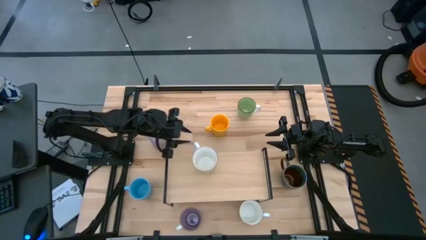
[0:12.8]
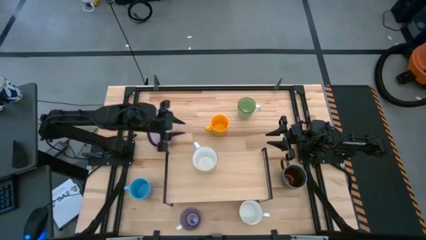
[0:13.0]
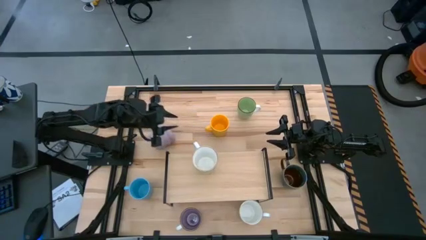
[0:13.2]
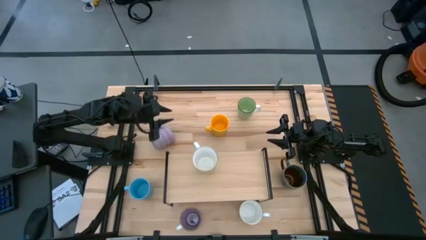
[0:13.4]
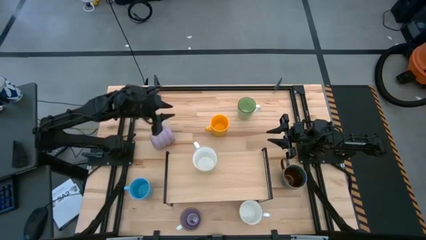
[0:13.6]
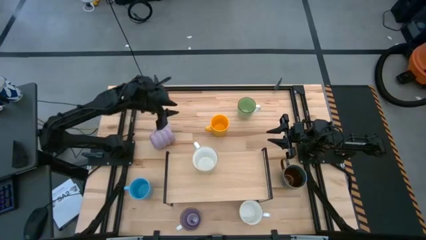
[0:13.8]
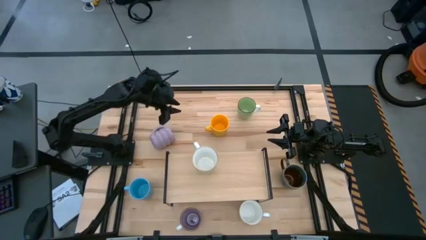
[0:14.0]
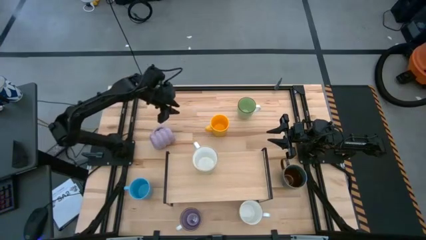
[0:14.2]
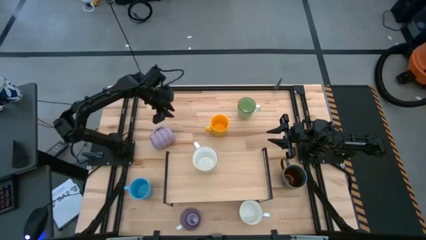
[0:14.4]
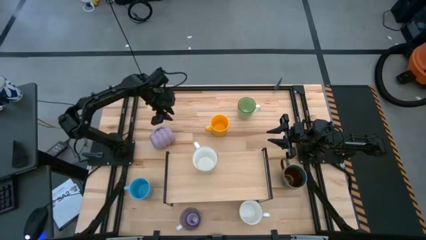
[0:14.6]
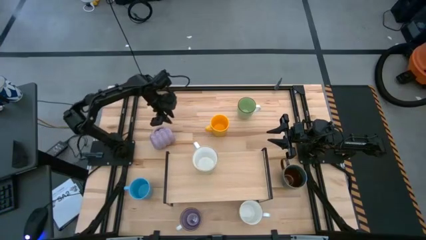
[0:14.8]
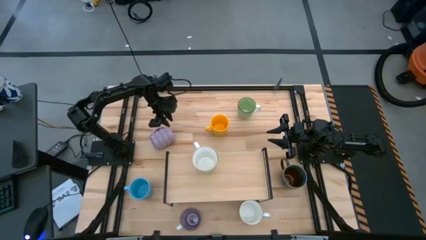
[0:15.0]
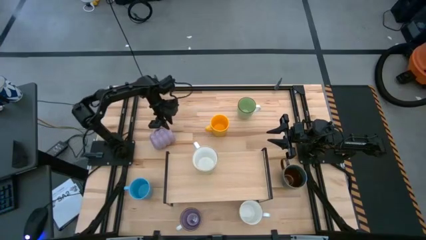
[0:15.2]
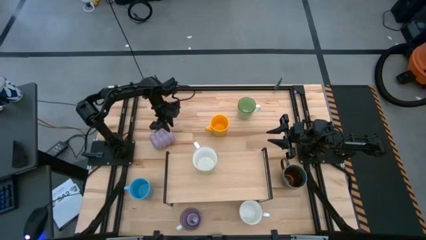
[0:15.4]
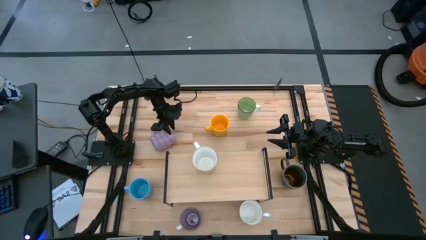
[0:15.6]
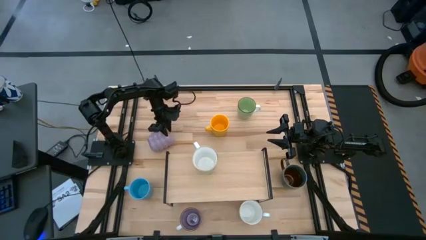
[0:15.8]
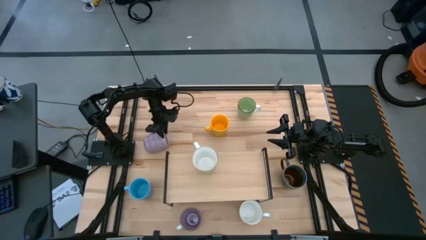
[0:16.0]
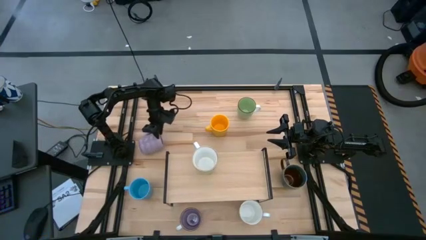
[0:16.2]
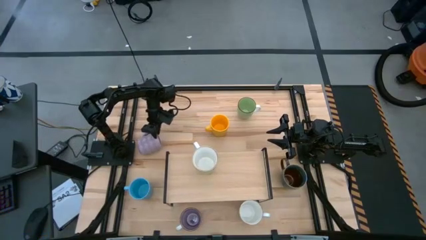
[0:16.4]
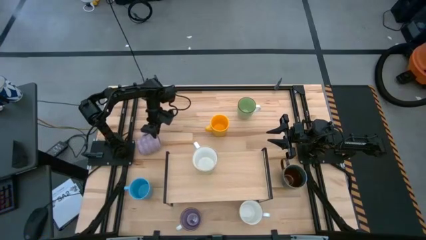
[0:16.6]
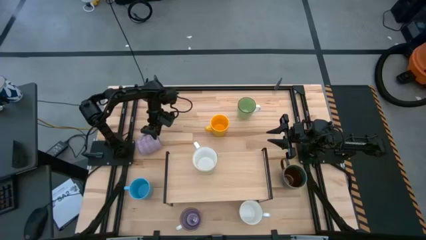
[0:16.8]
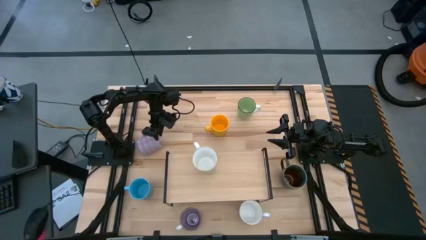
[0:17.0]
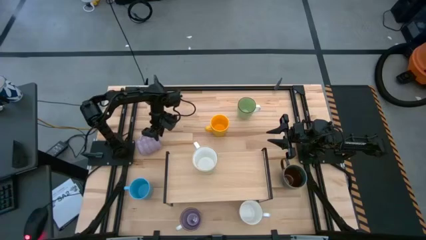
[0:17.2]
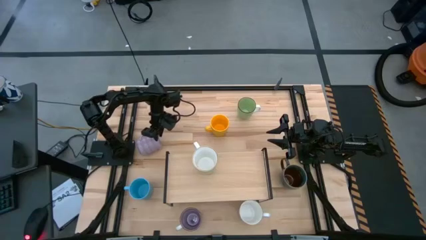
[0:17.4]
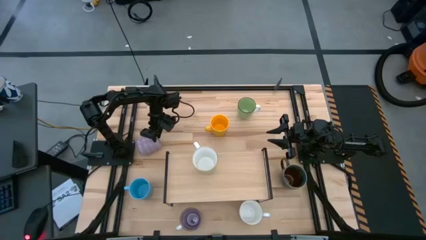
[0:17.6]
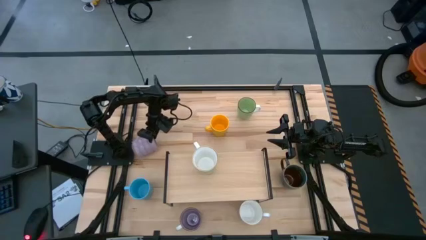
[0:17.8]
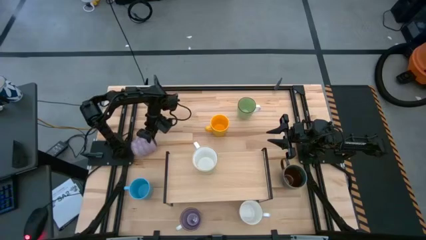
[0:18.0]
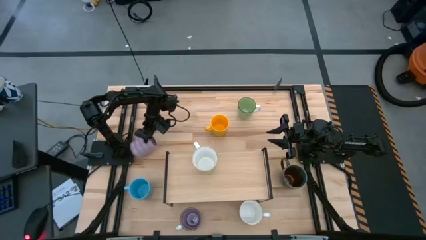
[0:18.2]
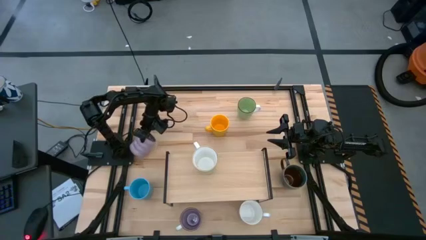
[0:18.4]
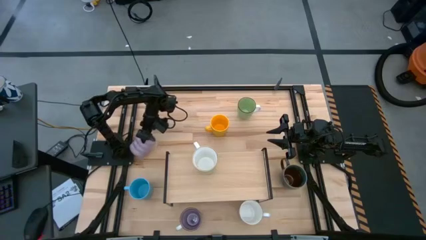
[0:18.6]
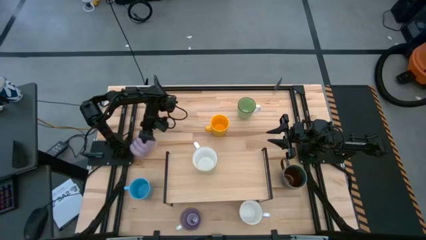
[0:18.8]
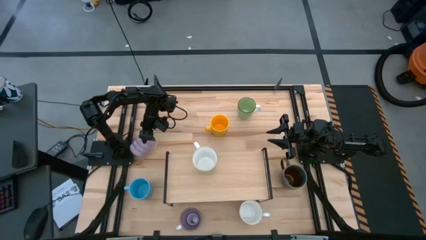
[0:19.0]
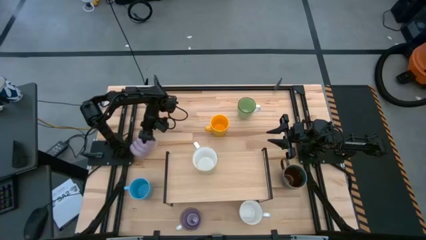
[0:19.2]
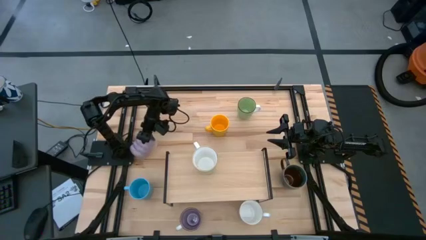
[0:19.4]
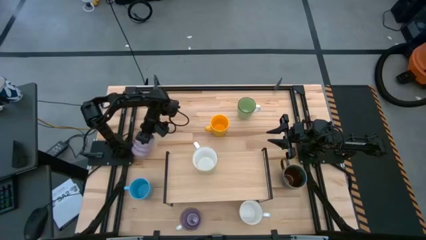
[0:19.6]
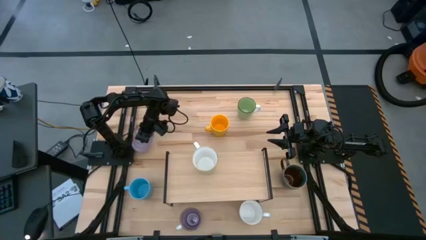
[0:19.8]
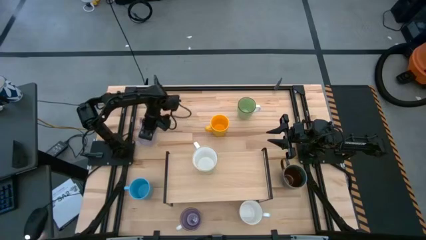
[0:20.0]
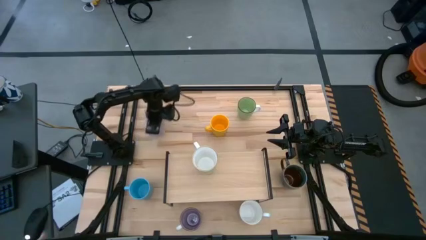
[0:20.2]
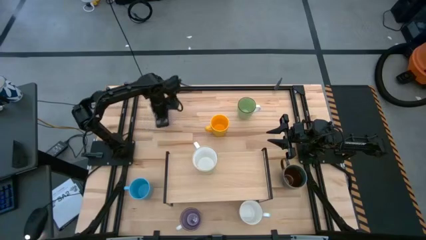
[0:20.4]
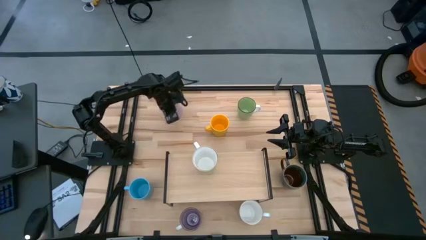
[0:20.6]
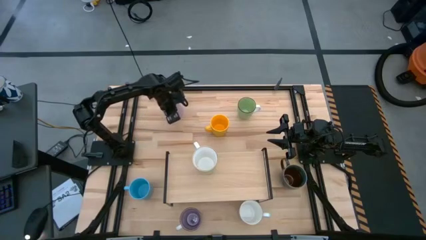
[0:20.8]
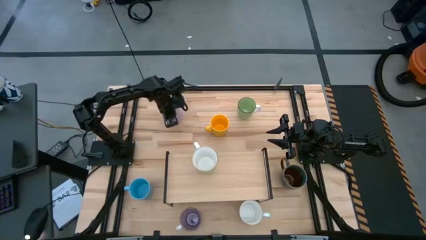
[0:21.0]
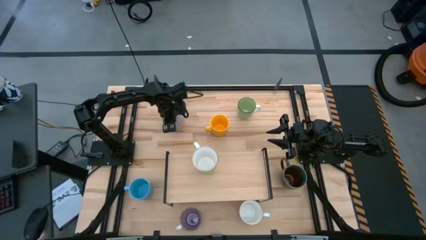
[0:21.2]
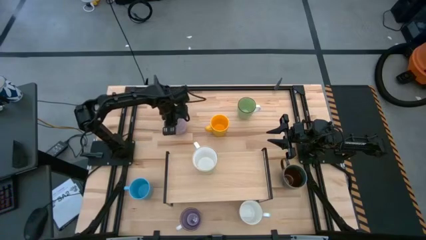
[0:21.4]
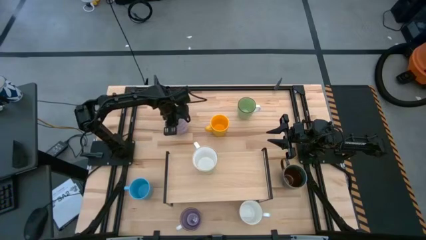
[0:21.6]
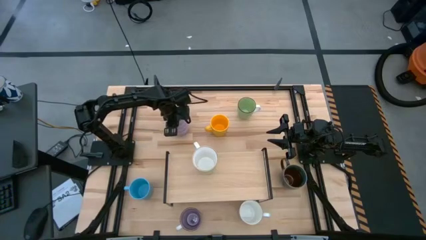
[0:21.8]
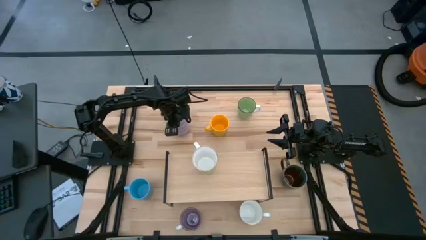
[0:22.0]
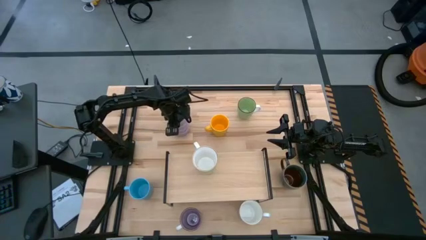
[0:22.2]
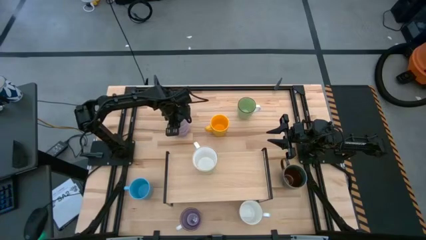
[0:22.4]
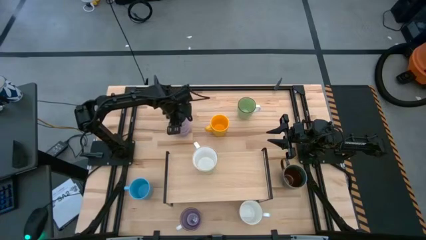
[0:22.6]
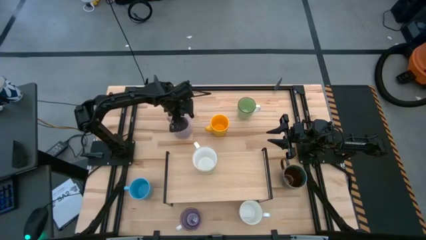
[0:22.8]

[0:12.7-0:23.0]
Task: Place coffee mugs
Put the purple mug on the shelf

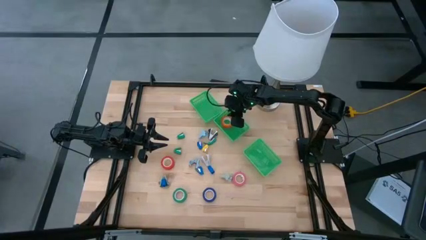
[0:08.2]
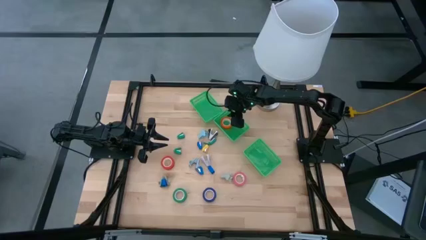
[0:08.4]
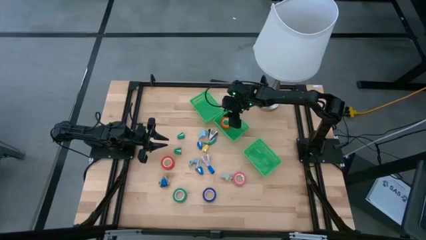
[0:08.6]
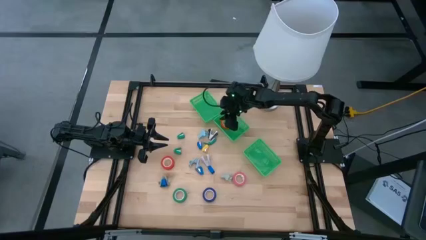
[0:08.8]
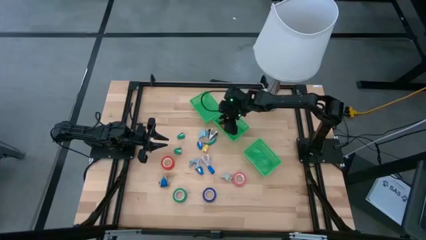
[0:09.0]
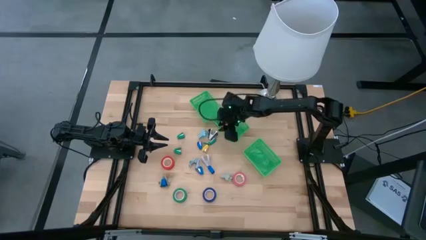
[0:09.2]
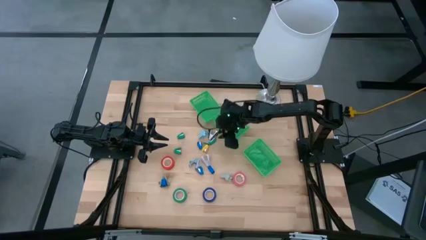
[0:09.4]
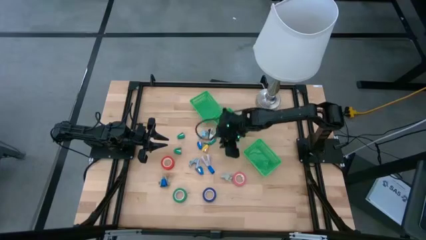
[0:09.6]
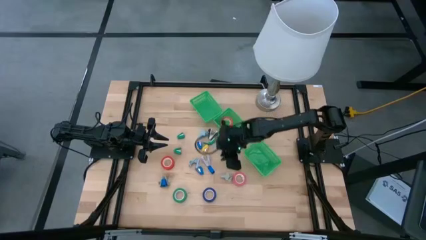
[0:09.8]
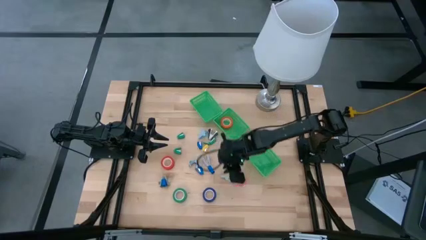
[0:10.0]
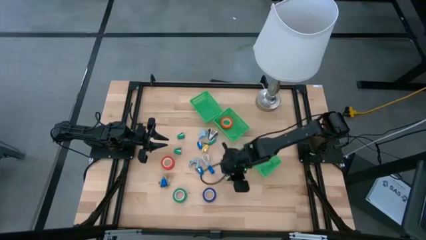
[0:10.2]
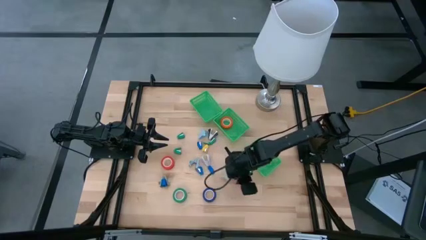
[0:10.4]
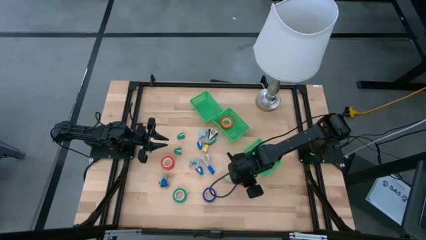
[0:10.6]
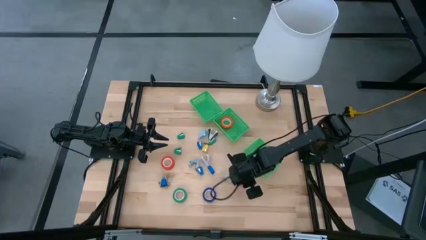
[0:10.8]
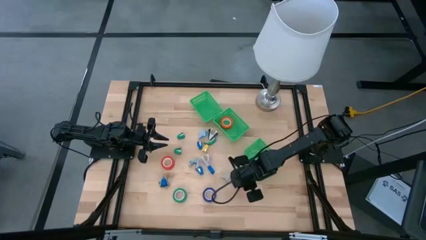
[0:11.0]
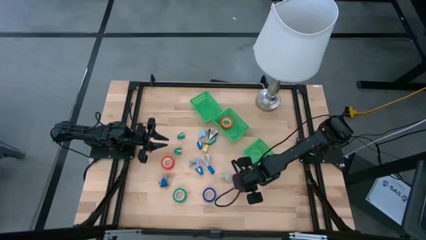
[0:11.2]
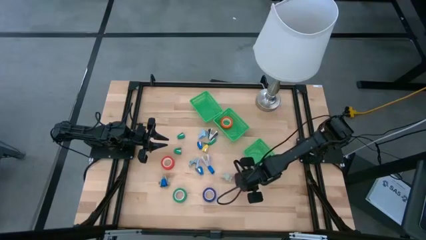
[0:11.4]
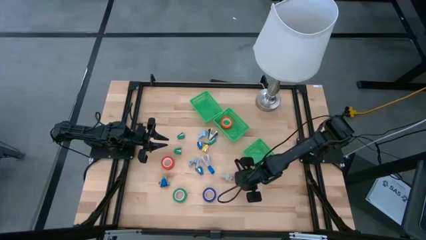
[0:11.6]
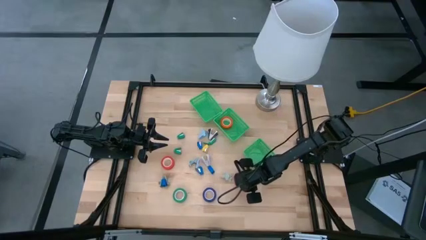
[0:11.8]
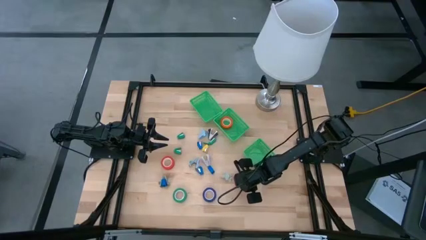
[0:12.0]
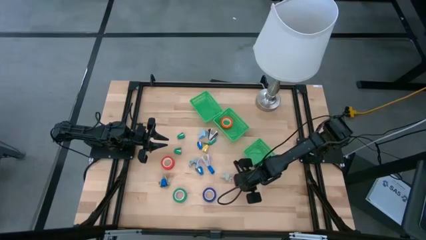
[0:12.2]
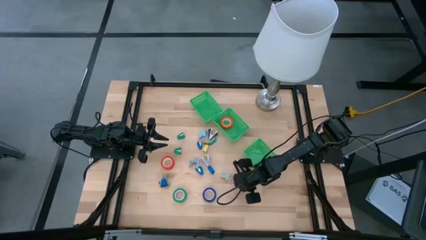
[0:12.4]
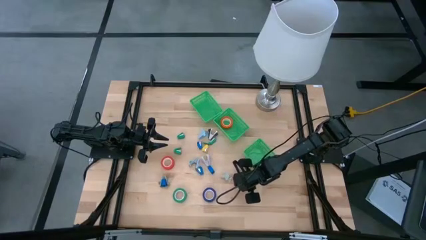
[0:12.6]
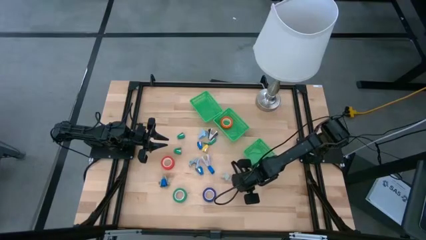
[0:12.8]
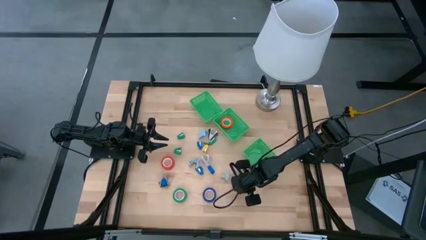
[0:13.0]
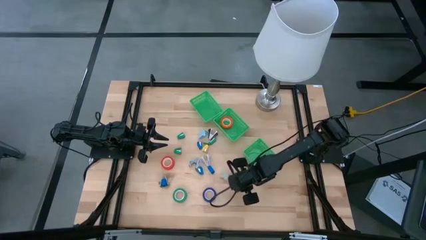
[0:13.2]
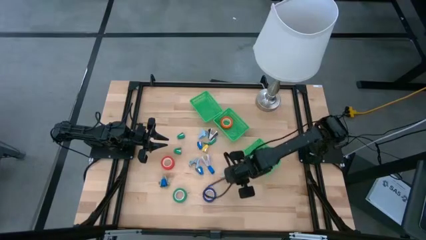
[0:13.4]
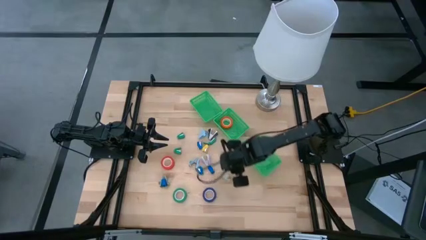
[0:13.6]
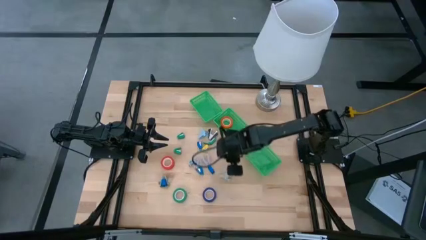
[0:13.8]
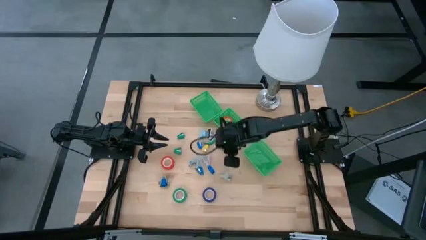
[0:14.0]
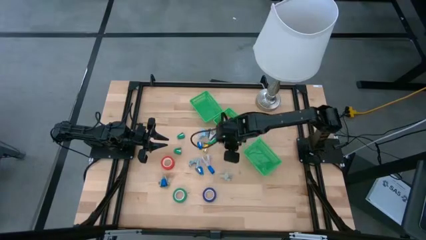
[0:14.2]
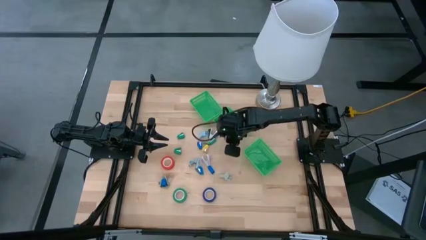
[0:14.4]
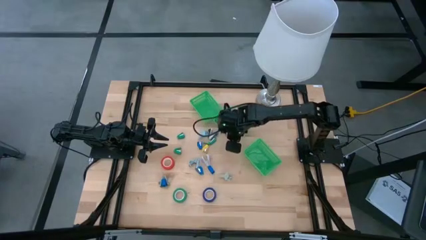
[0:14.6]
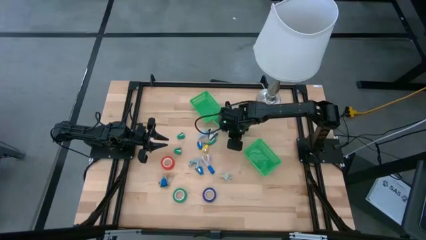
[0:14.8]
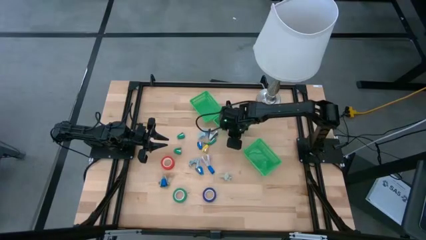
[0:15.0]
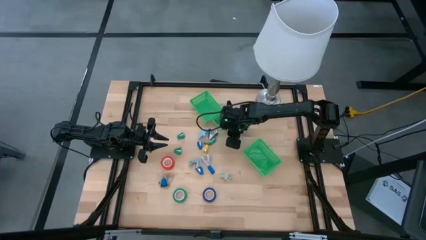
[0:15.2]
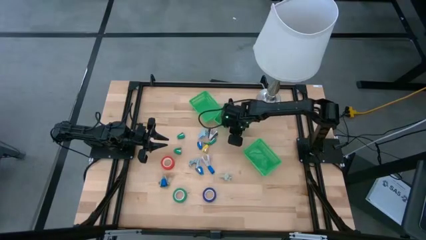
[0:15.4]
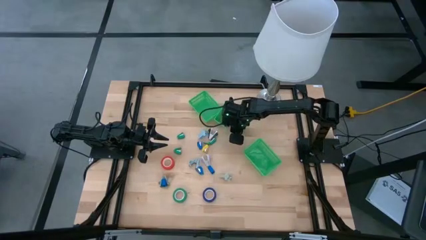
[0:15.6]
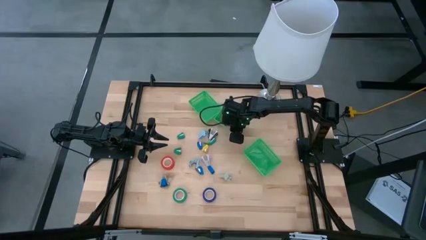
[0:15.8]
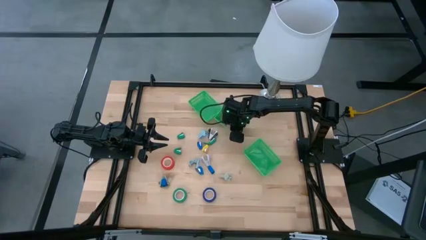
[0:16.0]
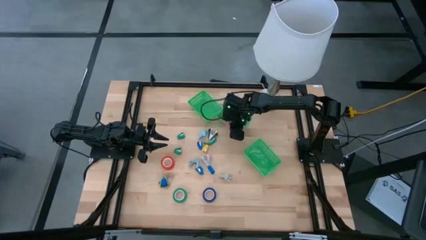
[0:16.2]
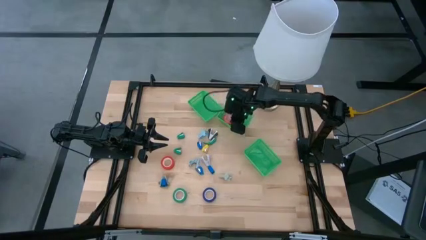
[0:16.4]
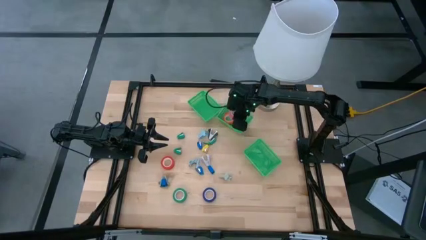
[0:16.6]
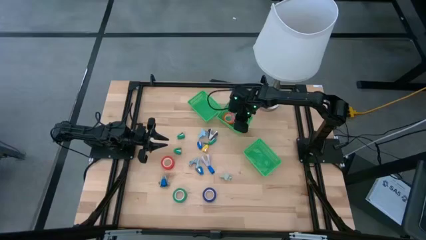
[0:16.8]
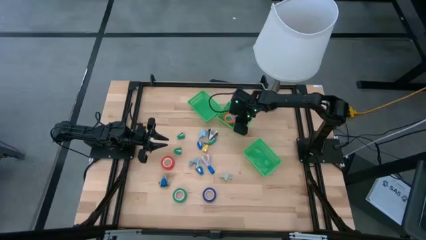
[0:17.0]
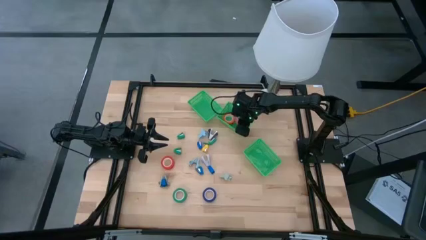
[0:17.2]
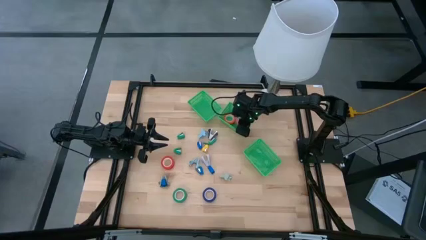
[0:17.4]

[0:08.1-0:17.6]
Task: Pick and place Stapler, Stapler remover, tape
Put the pink tape into the middle basket
